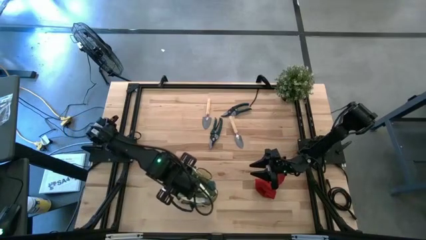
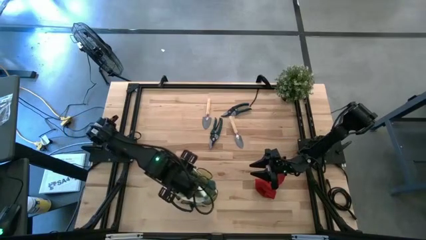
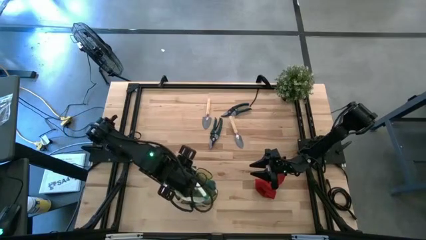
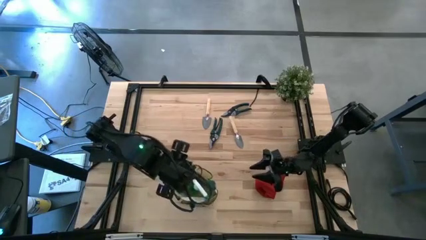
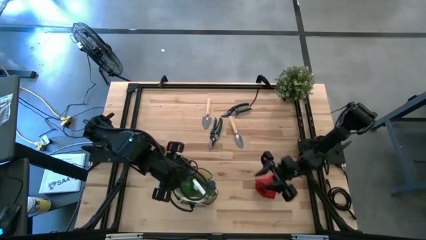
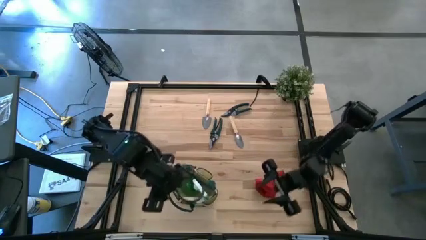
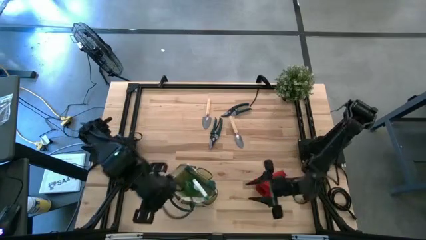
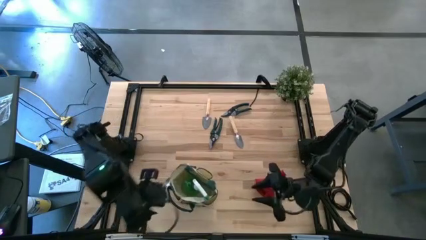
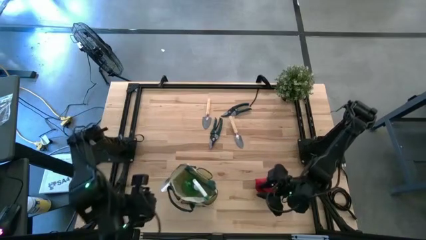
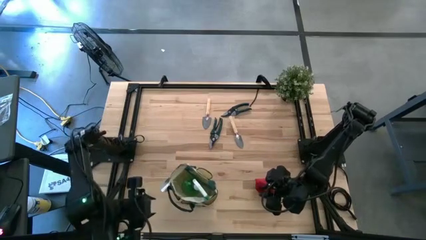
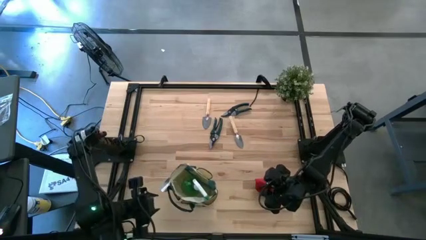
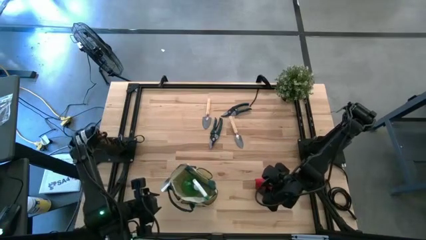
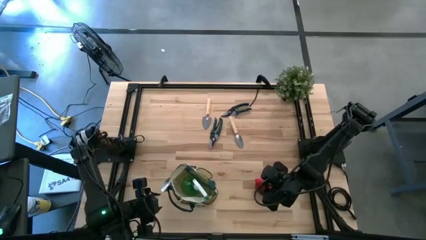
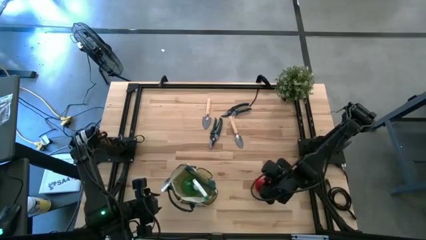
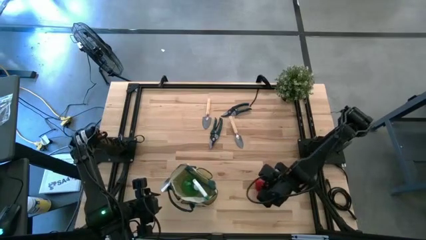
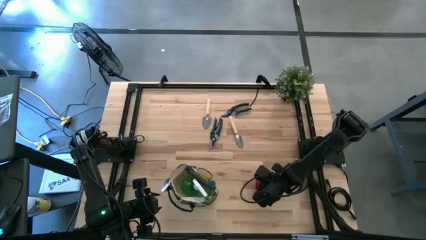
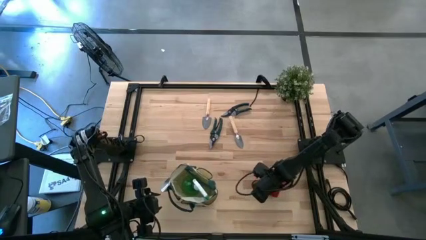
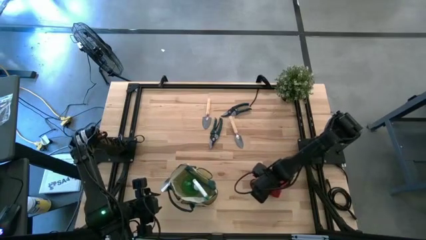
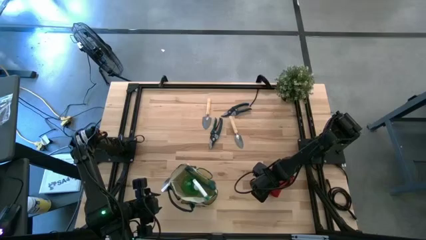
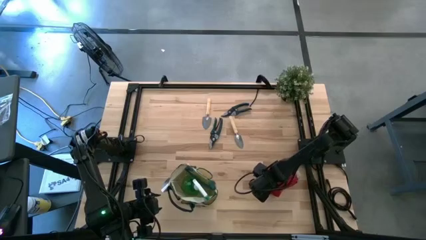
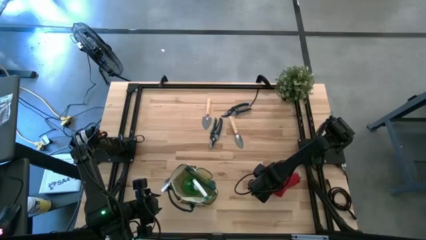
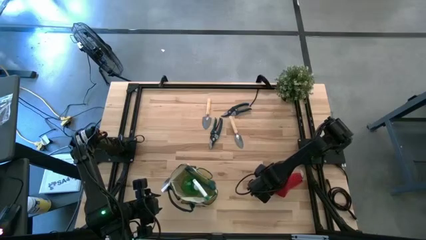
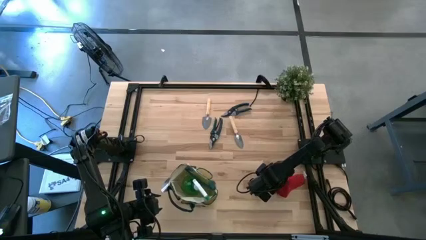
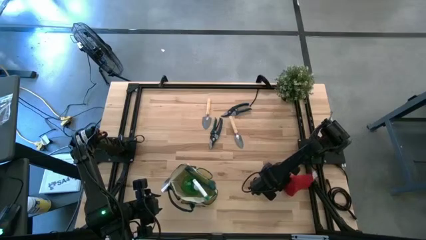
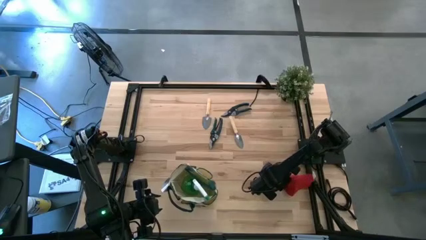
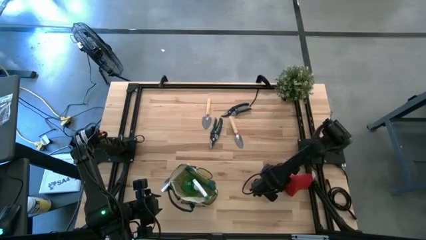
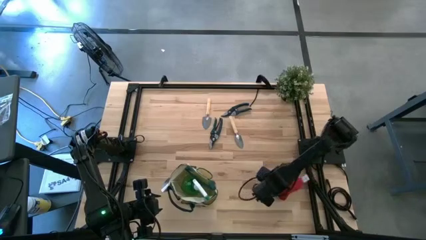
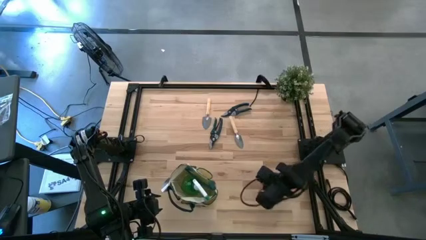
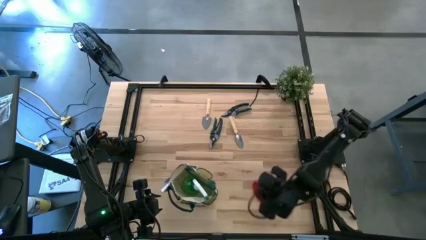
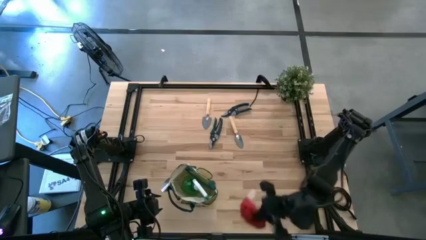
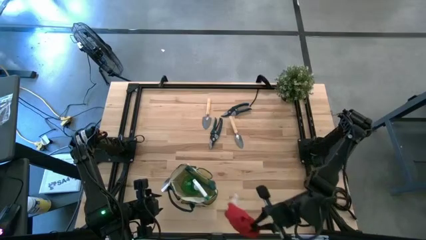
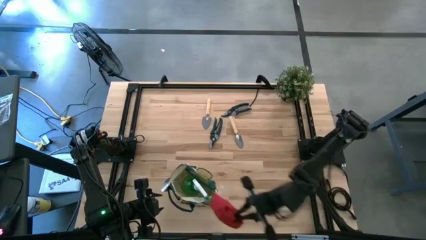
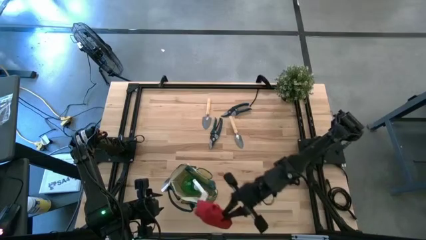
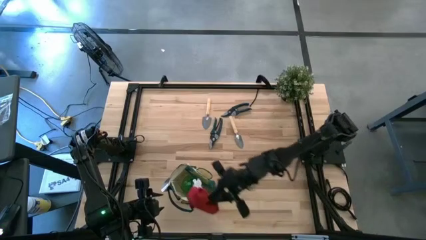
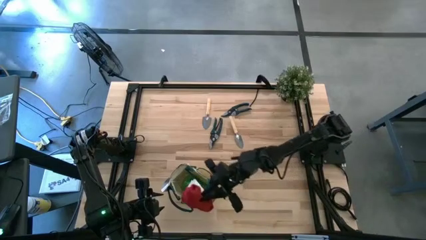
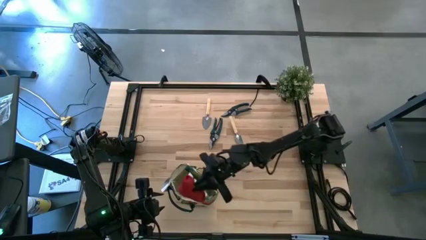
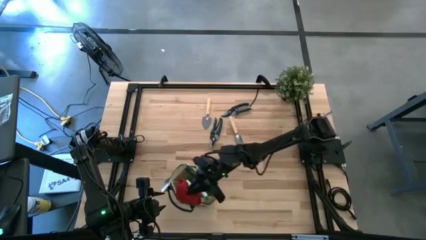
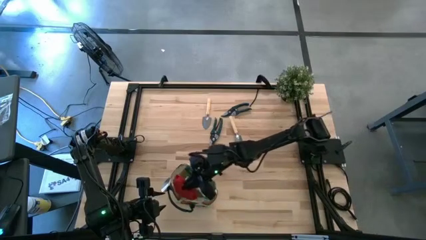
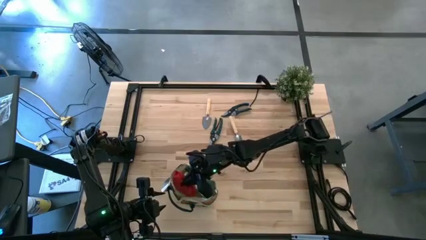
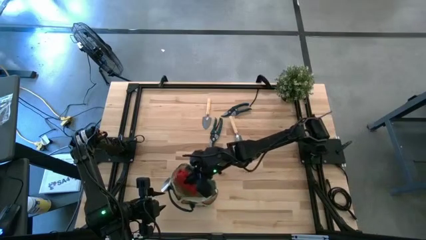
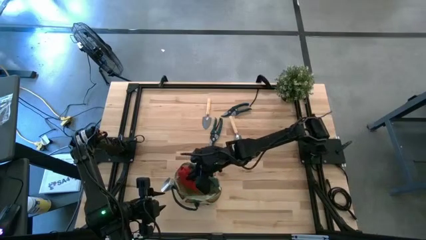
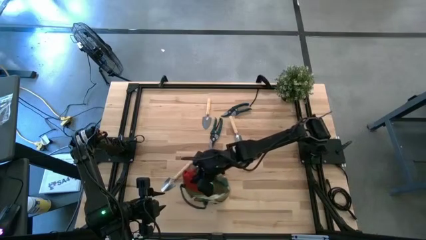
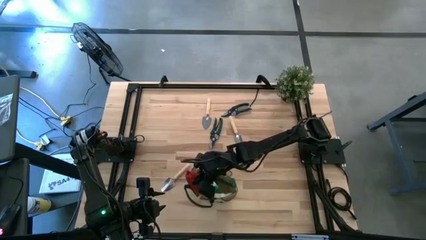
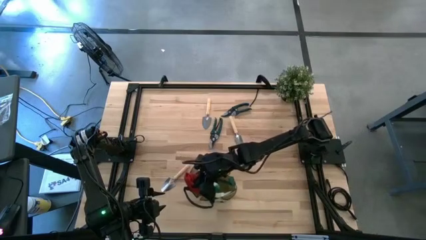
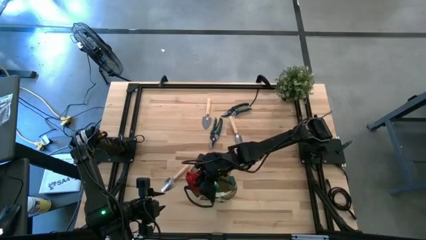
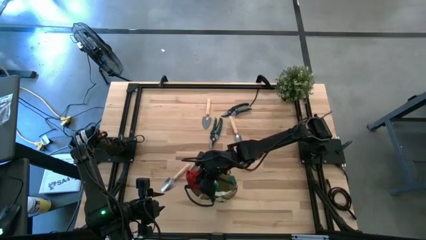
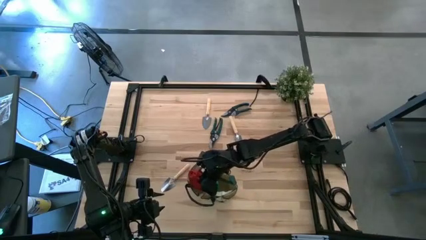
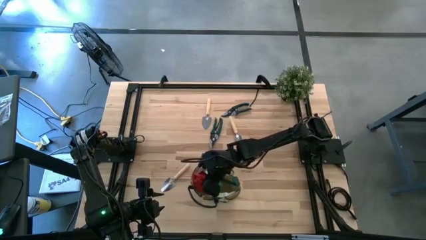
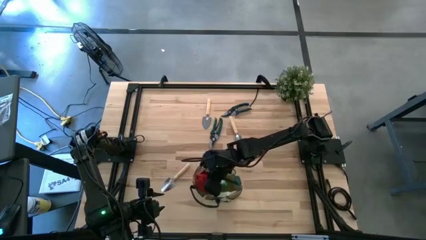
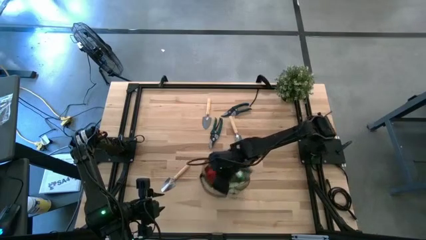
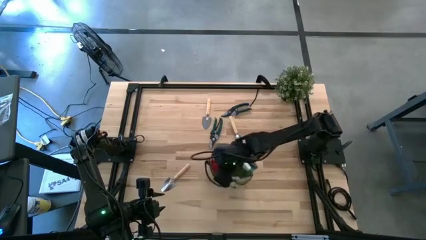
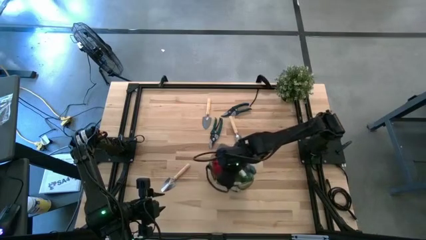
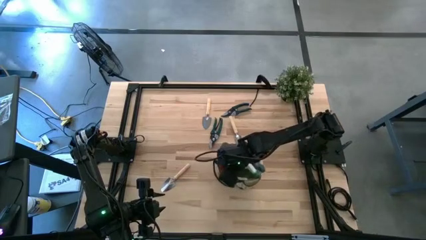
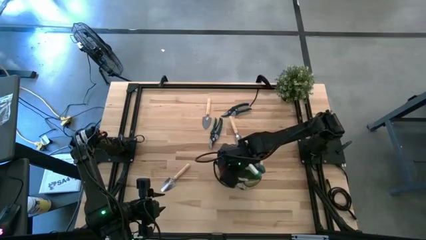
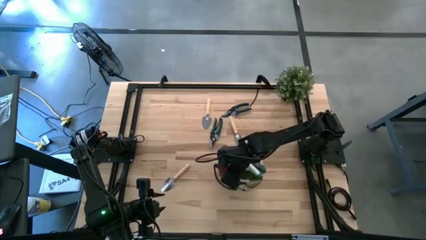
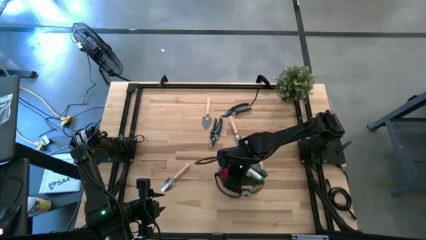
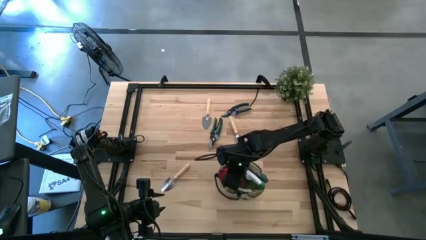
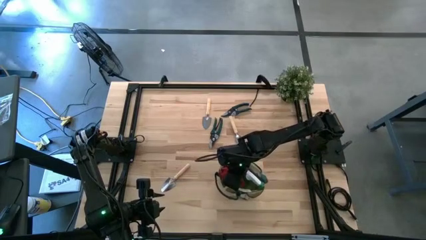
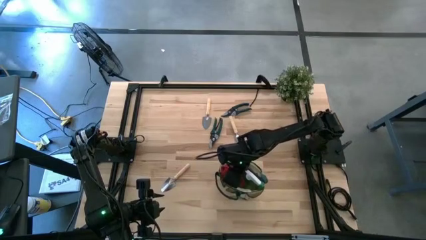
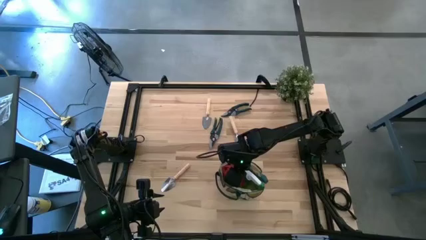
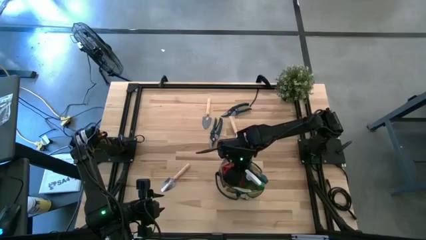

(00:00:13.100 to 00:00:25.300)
Task: Pick & Place Garden tools in Gardening bag
Put the gloves into the gardening bag
